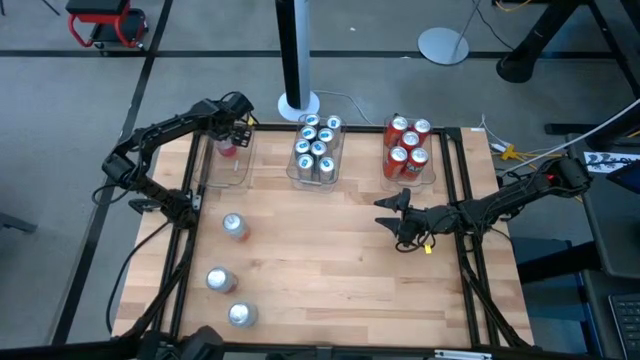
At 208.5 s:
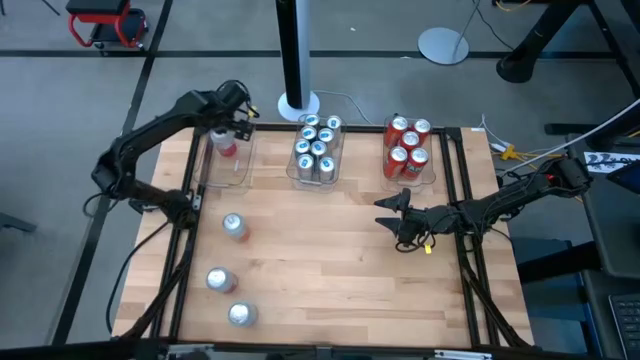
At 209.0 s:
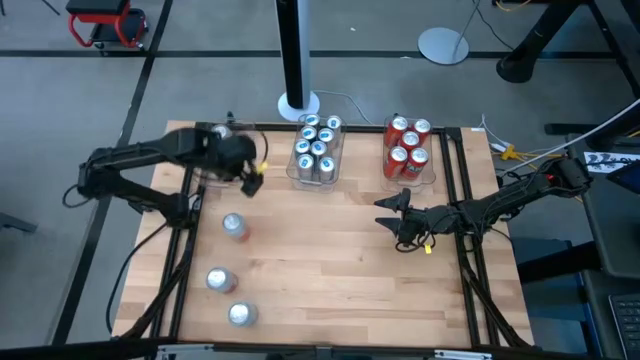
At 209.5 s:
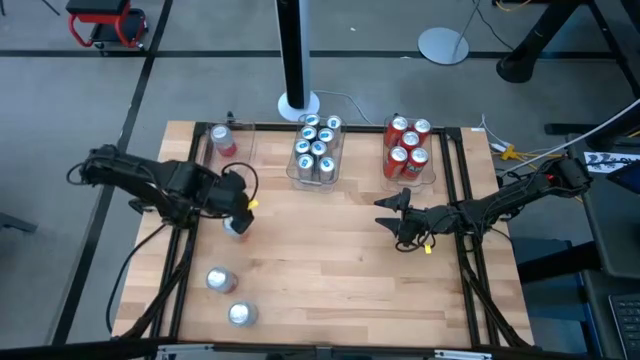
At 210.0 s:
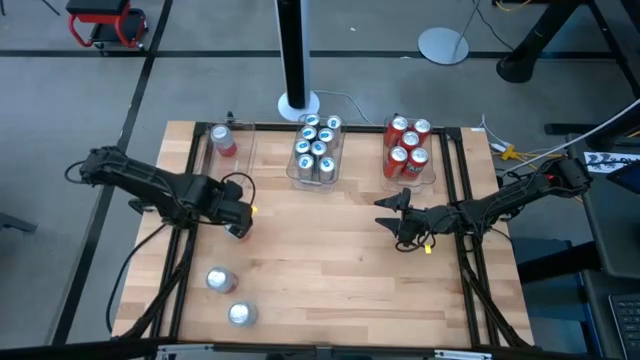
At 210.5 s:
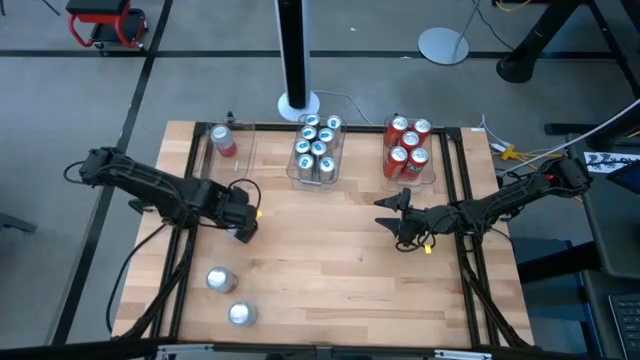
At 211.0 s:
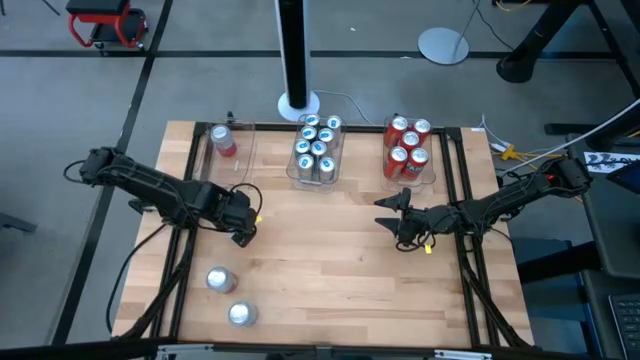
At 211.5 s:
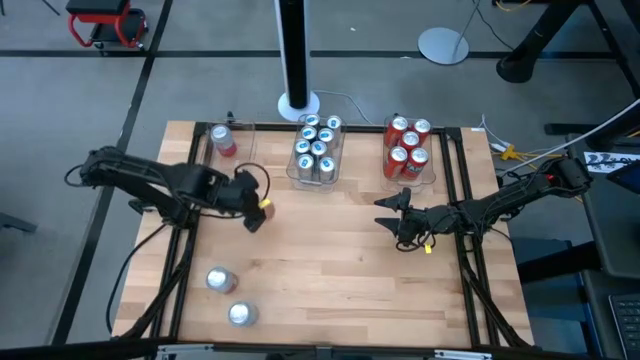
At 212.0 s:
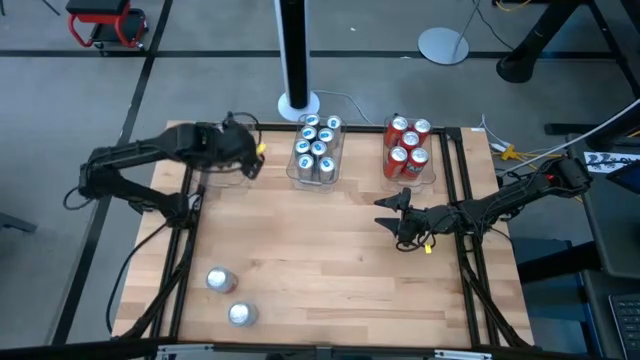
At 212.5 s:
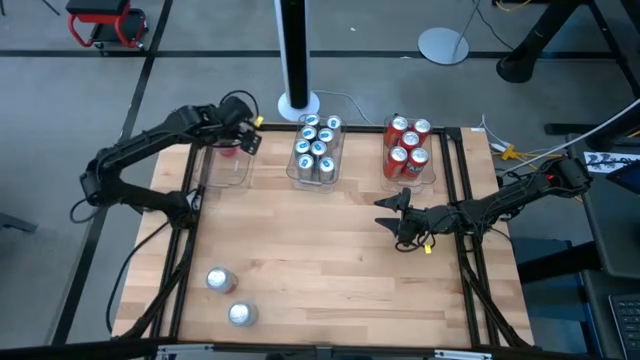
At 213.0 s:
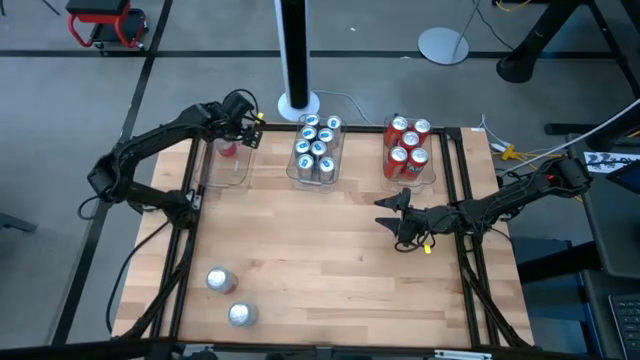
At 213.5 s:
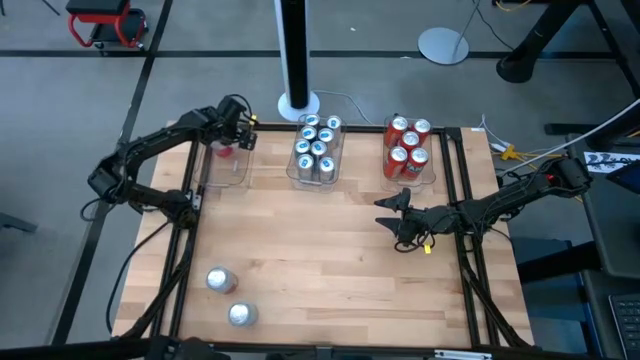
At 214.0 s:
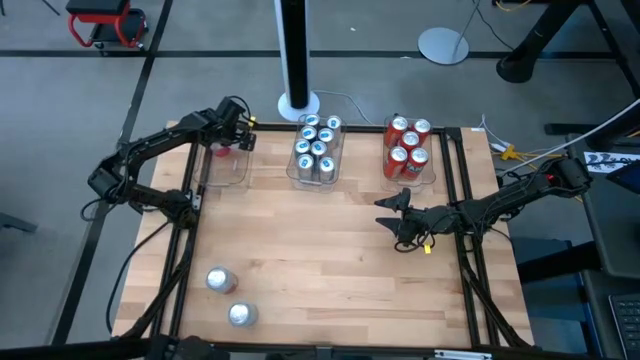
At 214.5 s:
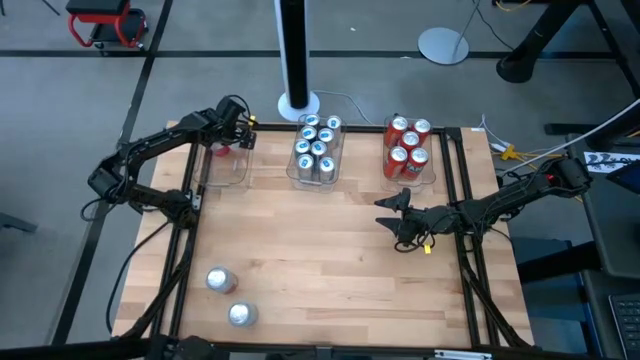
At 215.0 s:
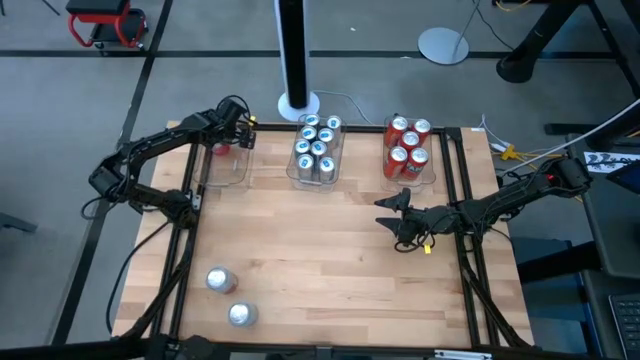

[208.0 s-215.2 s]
Task: Sort soda cans
Put the yellow-white soda can into the left transparent bin

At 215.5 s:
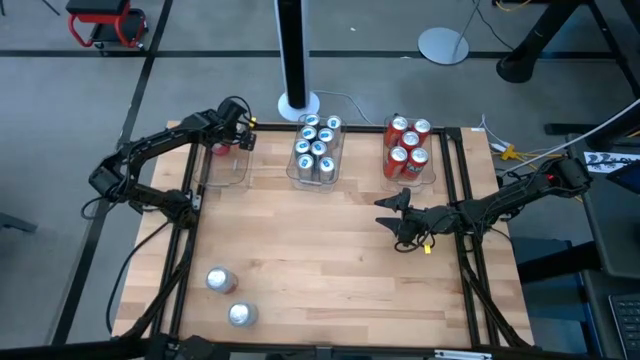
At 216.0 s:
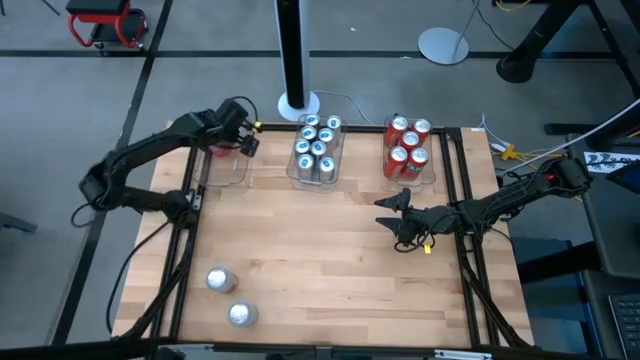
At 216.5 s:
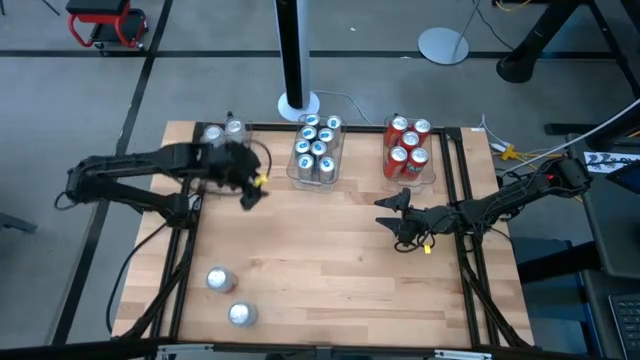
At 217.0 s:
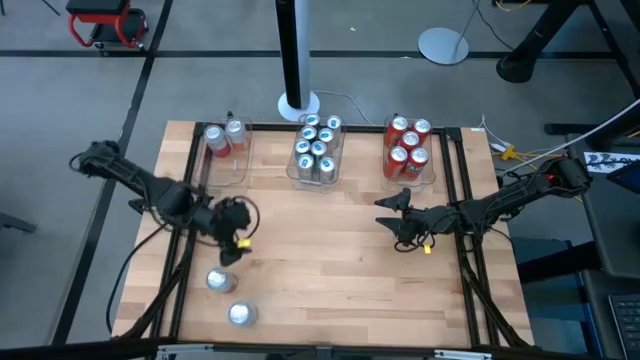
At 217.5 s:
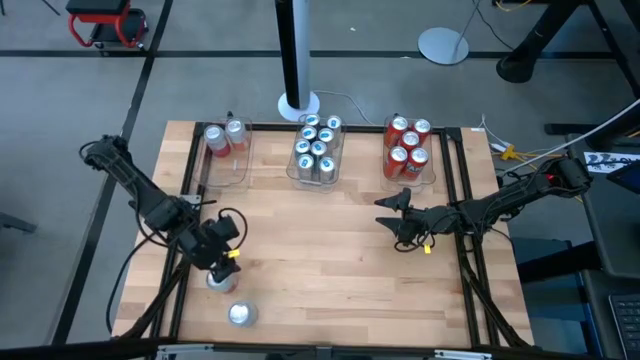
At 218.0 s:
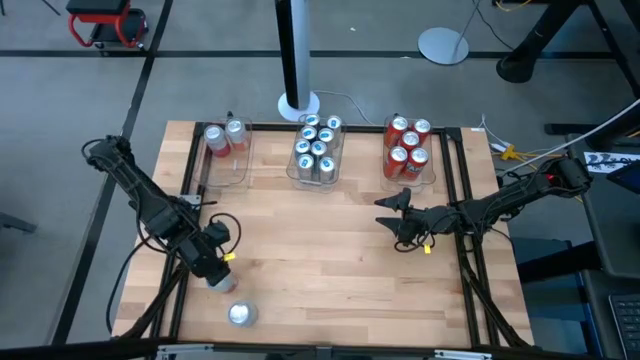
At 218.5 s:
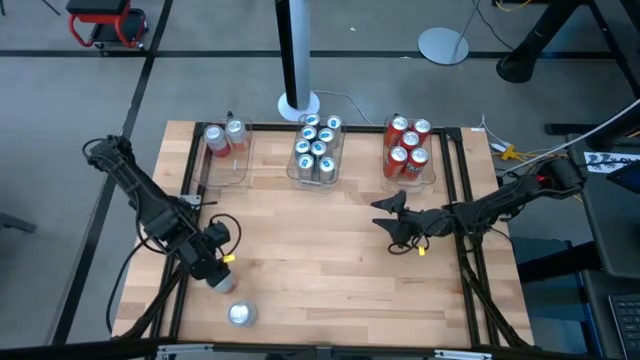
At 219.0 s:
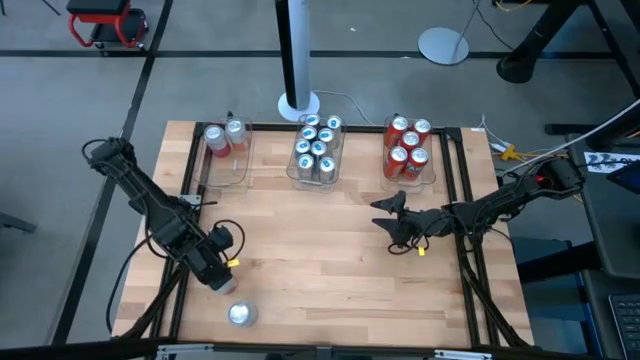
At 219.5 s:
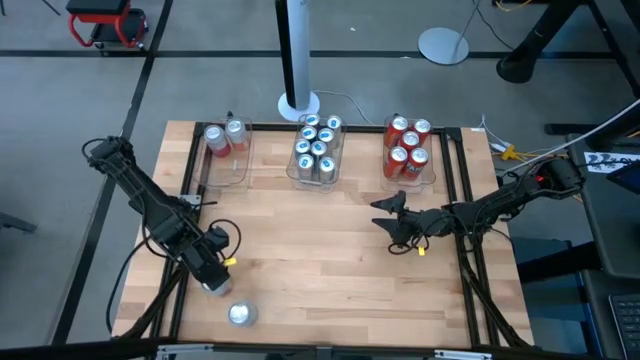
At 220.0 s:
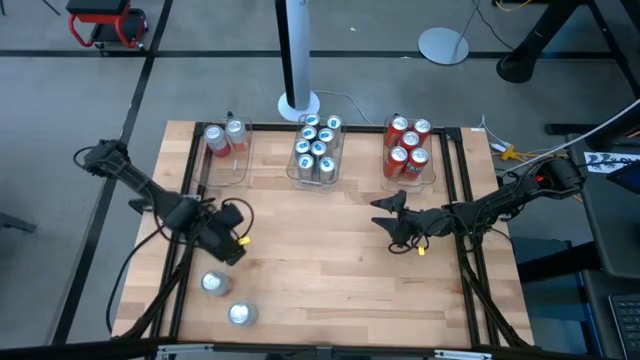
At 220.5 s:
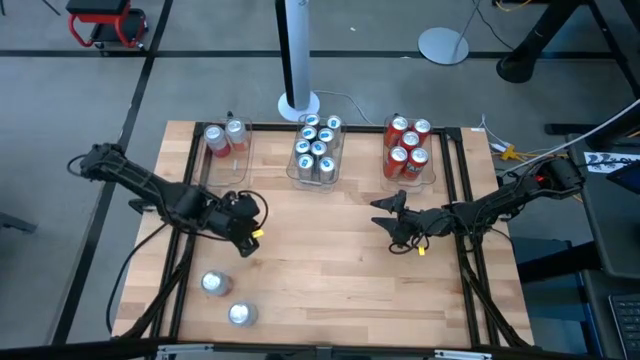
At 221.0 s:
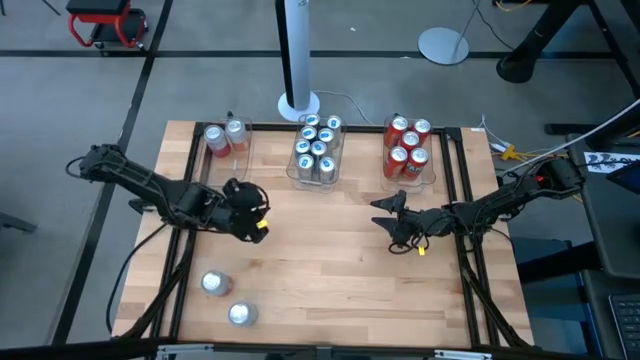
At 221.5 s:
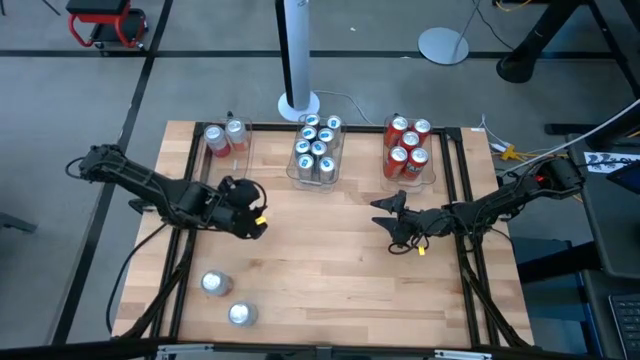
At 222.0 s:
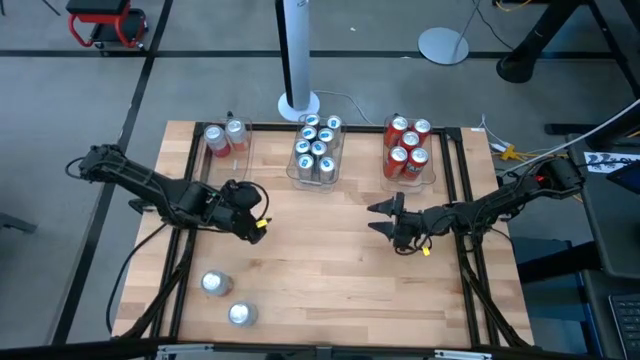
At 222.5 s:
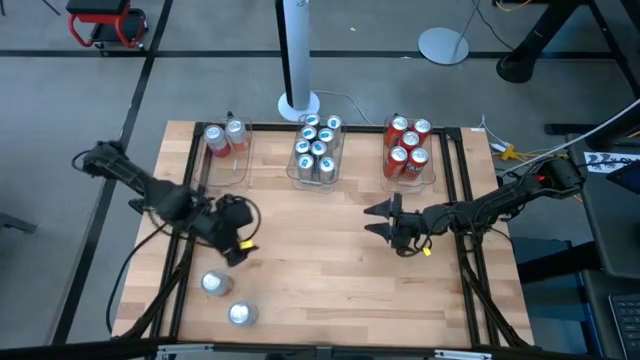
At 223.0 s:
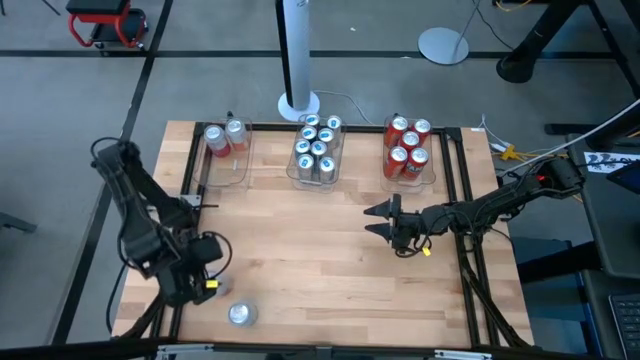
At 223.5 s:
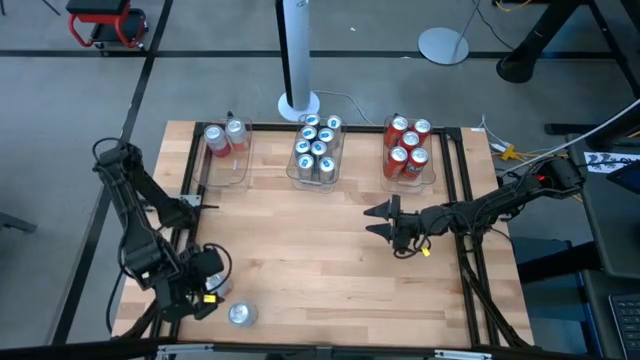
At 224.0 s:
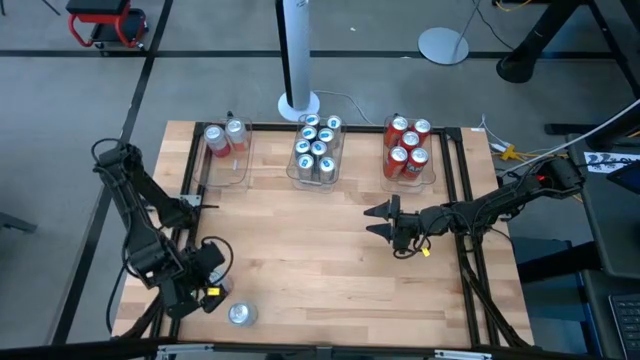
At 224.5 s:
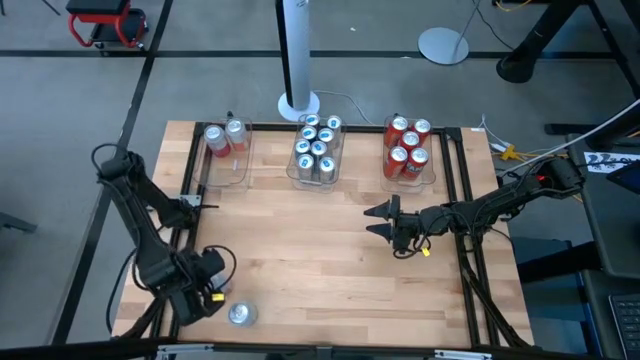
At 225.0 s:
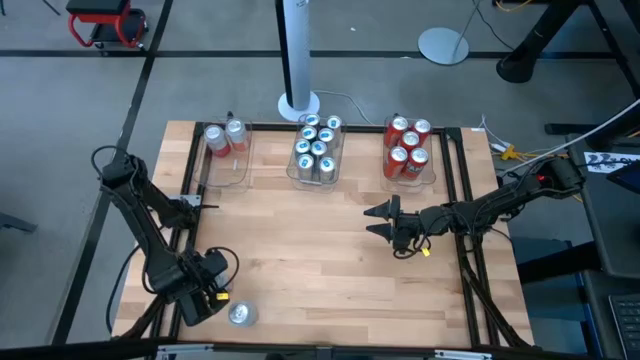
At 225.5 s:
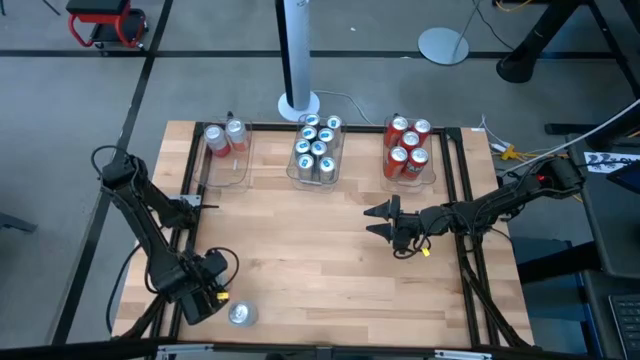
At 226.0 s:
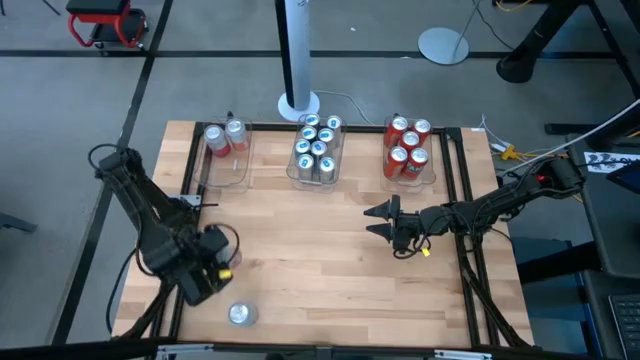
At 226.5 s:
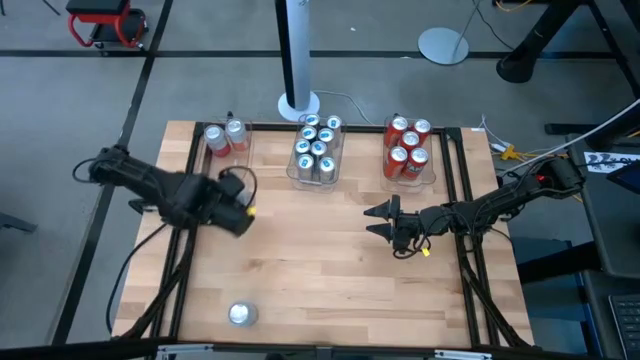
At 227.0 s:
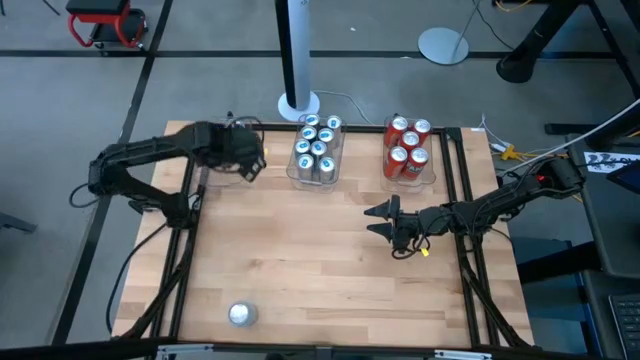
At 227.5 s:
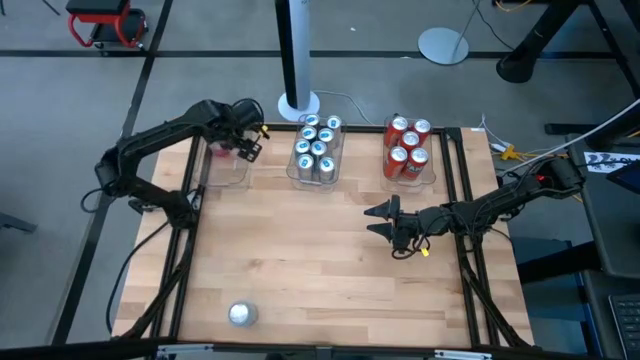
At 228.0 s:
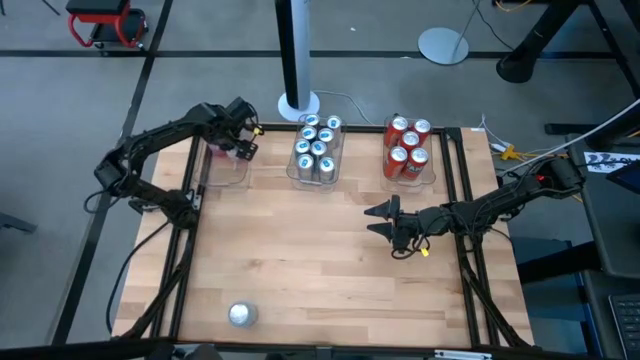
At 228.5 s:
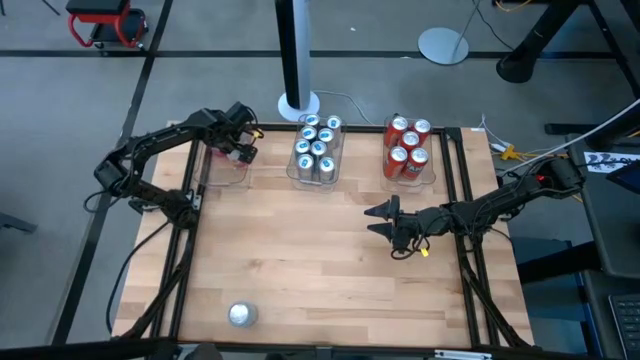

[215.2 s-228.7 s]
Put the pink-white soda can into the left transparent bin

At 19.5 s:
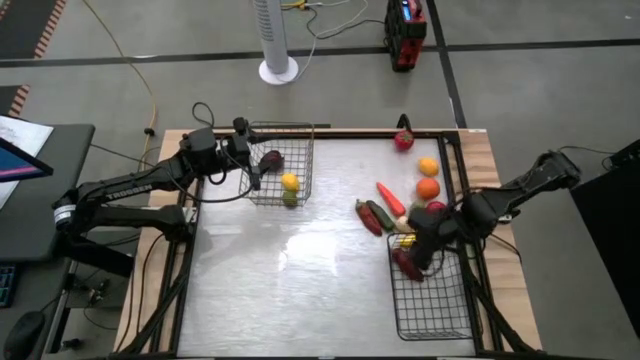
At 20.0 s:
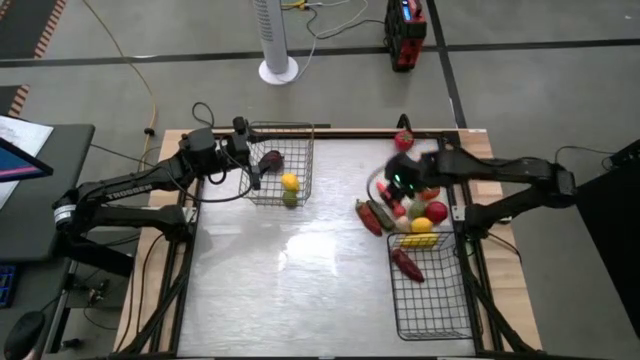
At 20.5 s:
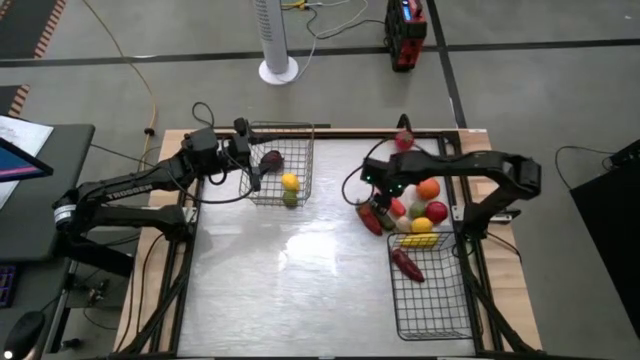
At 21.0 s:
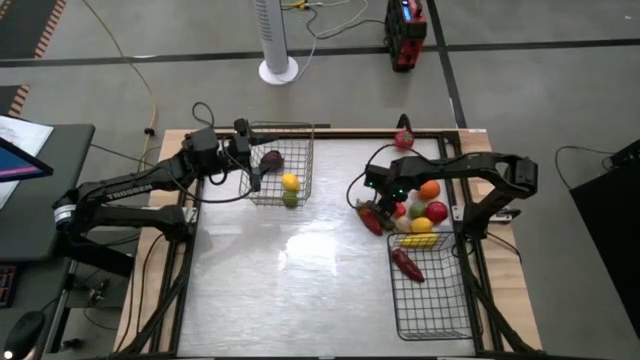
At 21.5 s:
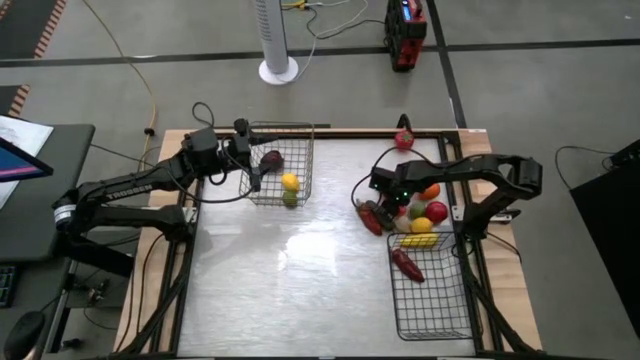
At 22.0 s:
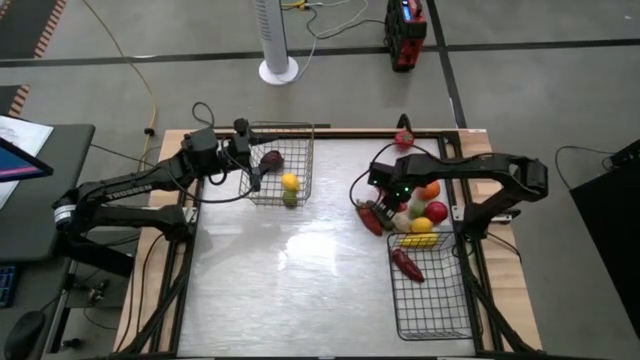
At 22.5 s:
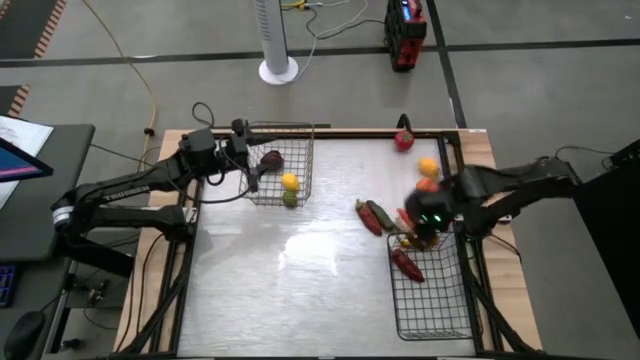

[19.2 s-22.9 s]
Task: Sort produce into baskets
Put the carrot into the right wire basket
